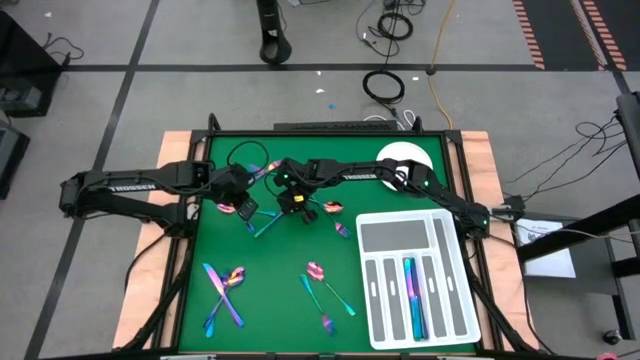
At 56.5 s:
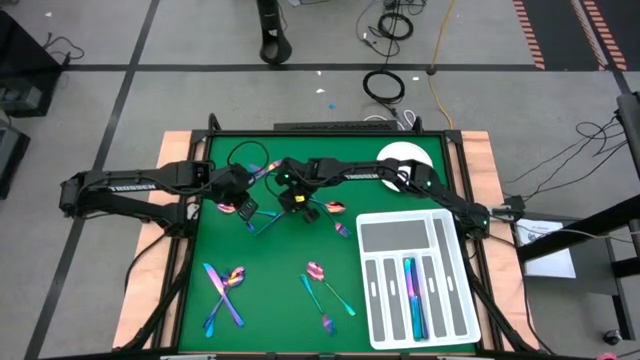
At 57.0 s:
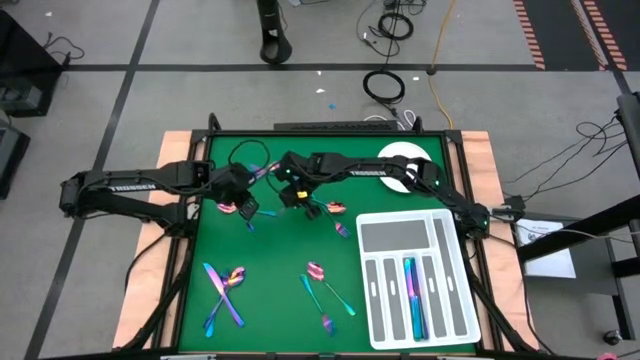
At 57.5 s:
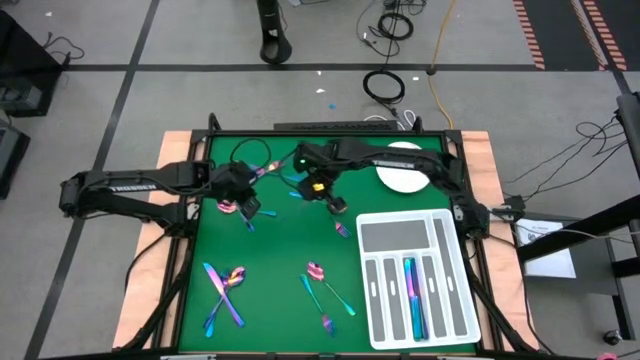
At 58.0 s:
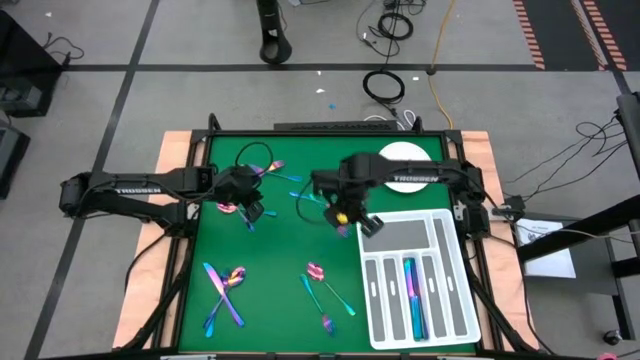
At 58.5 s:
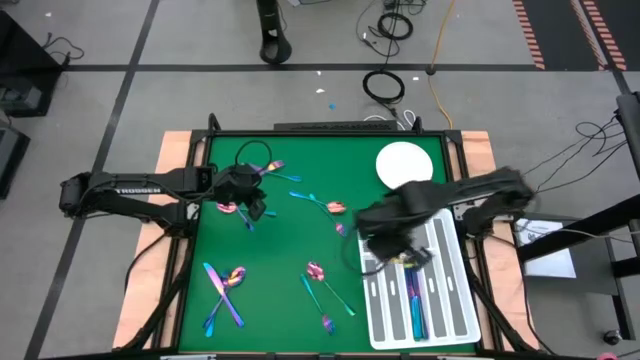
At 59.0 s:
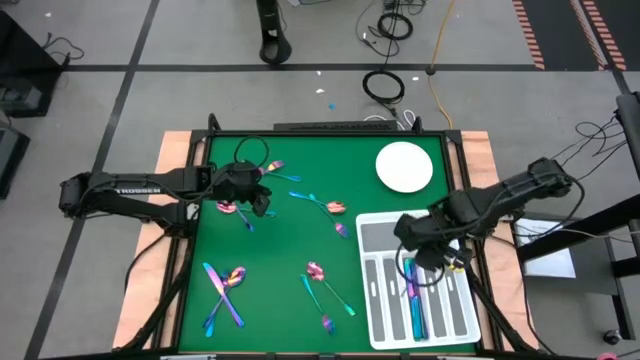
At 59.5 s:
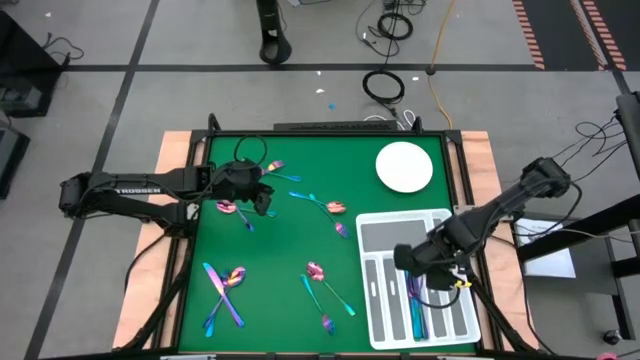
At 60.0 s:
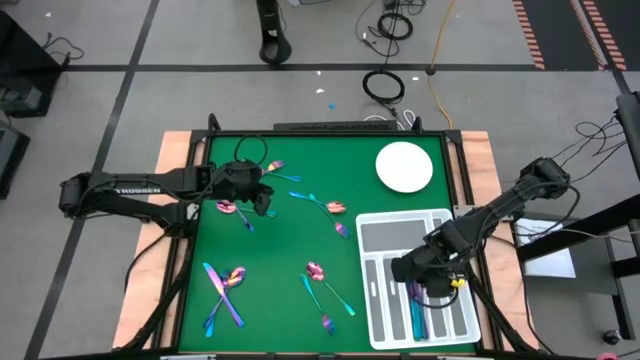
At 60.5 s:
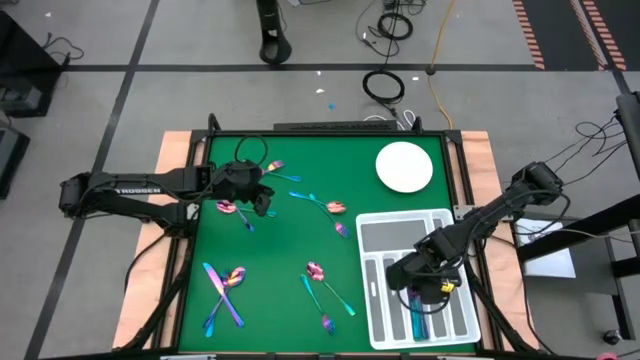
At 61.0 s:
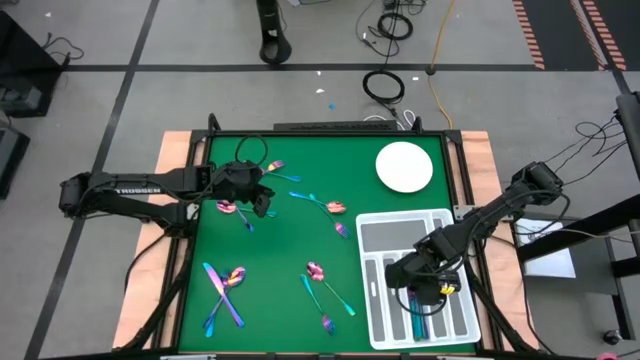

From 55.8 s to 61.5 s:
Task: Sort silverware
Put the top left knife into the utensil organizer

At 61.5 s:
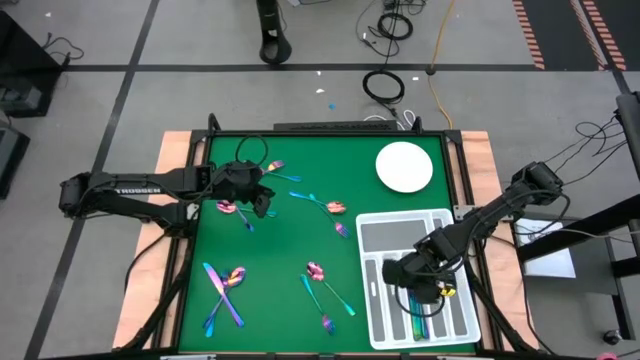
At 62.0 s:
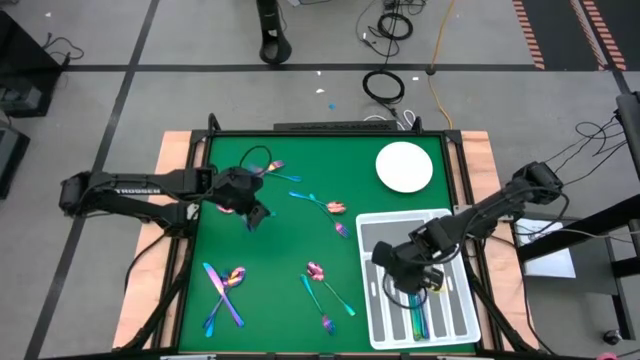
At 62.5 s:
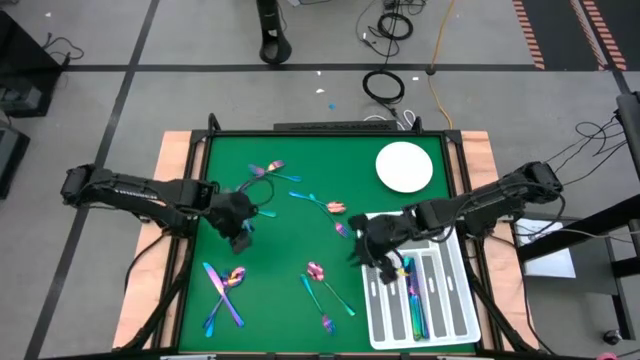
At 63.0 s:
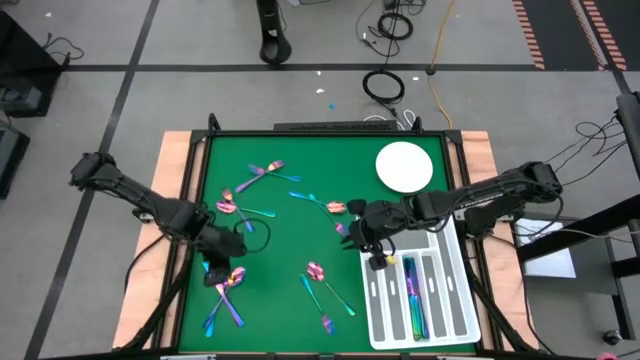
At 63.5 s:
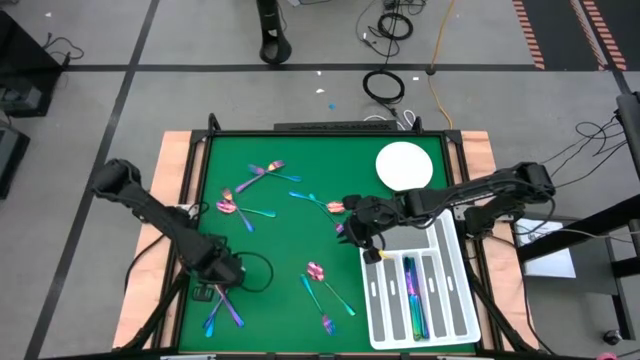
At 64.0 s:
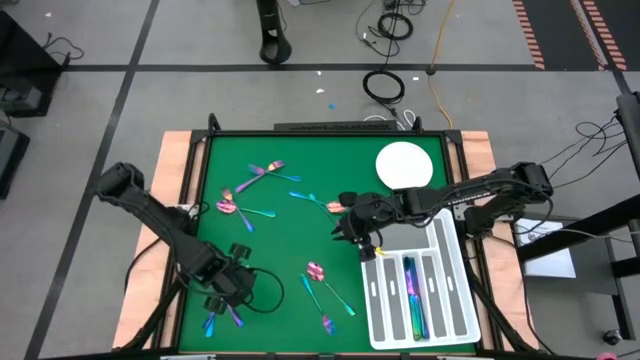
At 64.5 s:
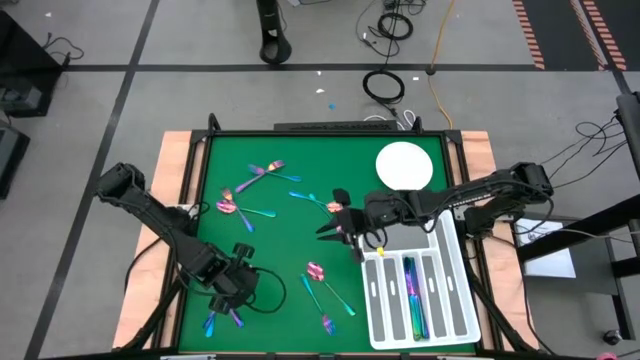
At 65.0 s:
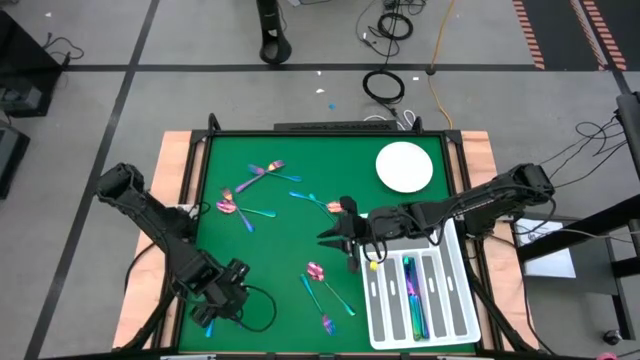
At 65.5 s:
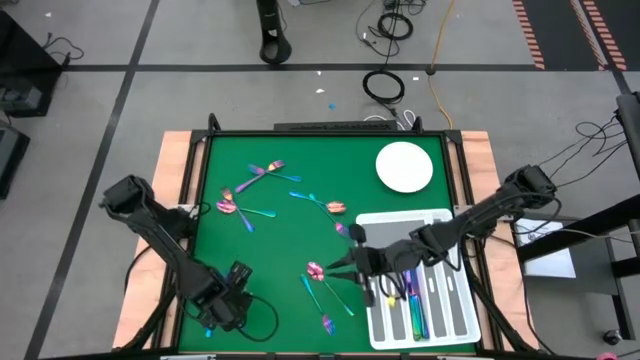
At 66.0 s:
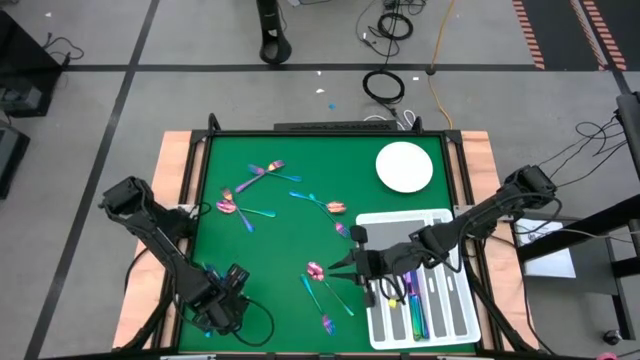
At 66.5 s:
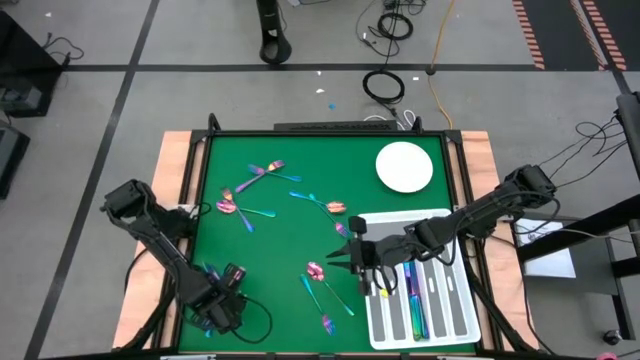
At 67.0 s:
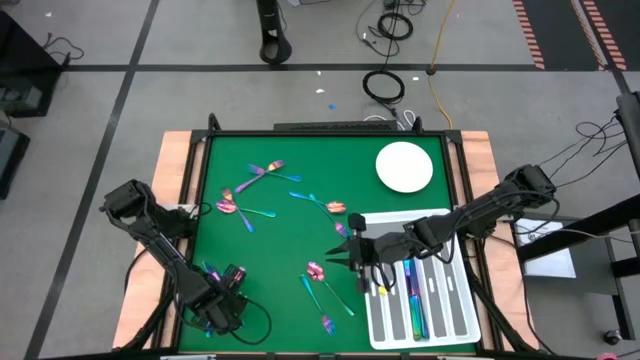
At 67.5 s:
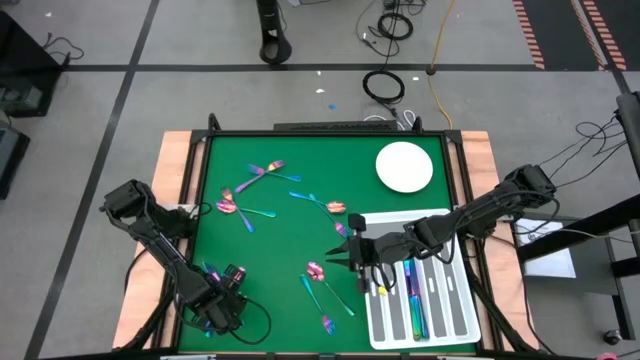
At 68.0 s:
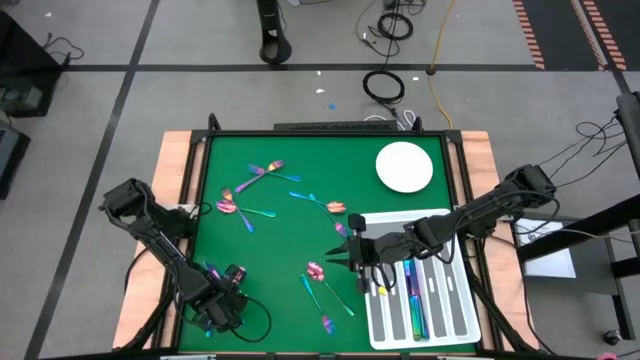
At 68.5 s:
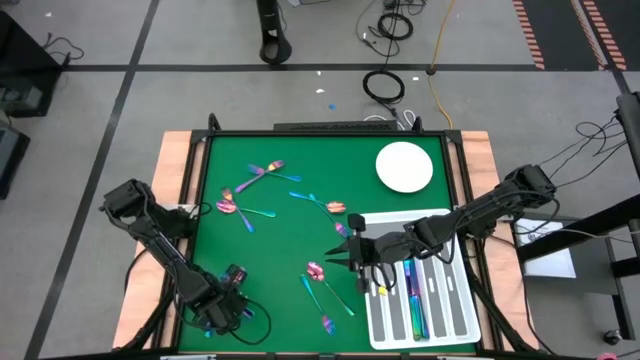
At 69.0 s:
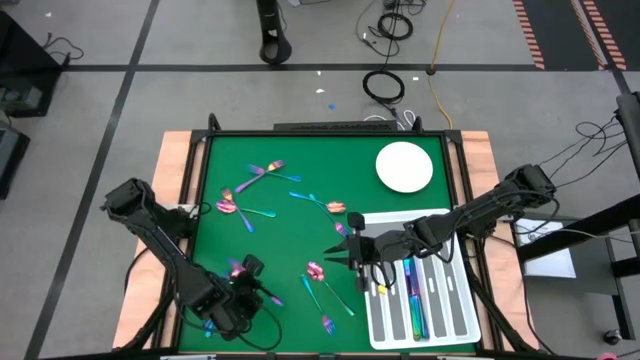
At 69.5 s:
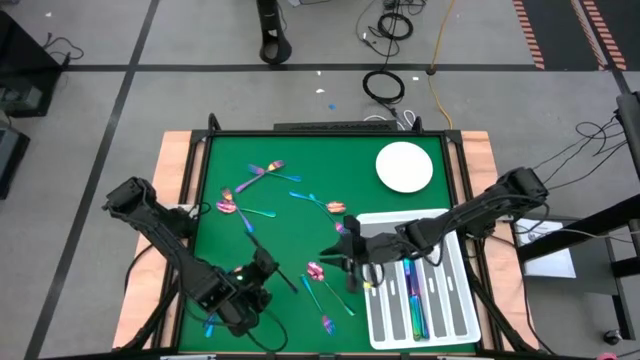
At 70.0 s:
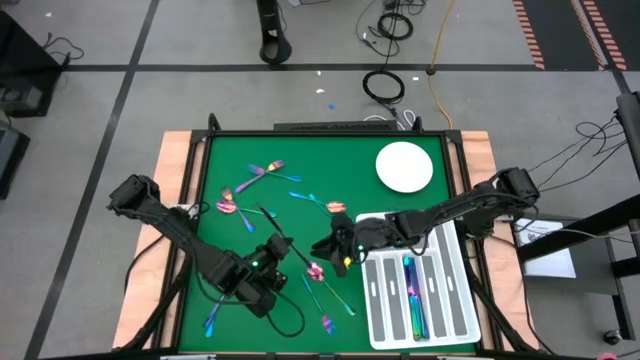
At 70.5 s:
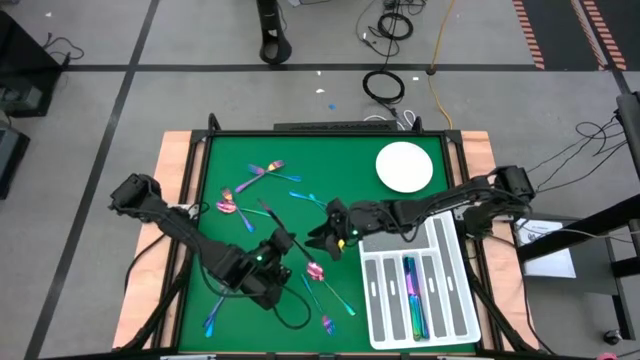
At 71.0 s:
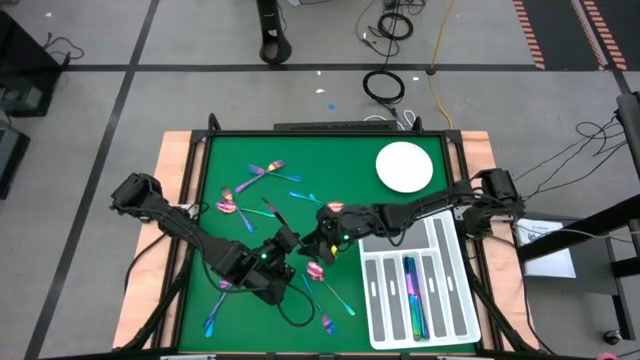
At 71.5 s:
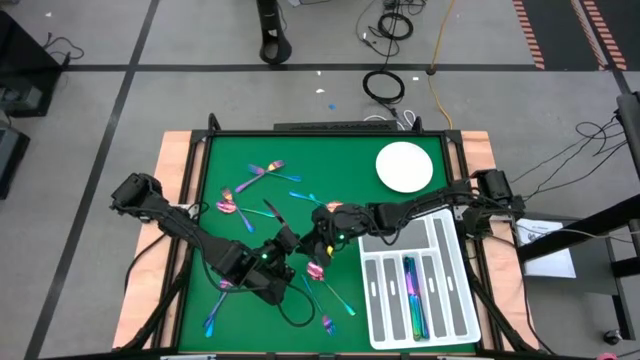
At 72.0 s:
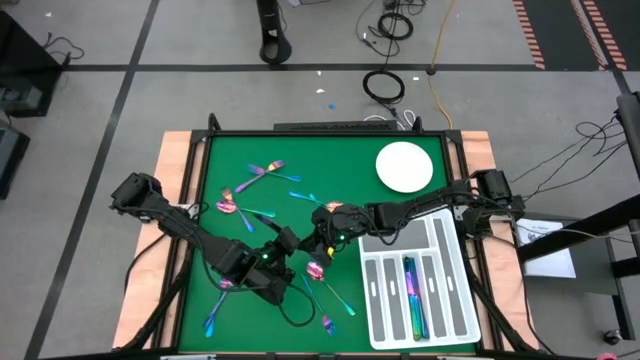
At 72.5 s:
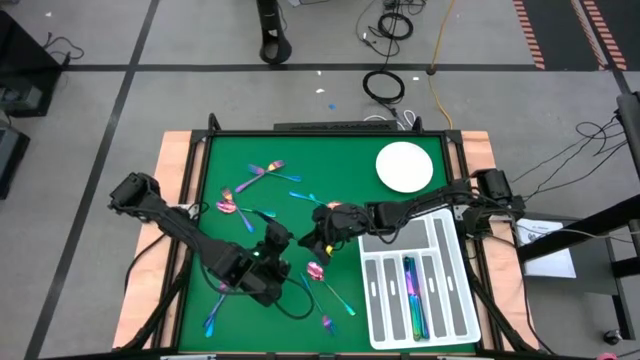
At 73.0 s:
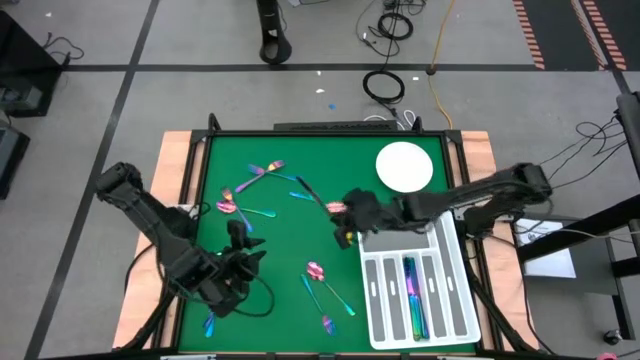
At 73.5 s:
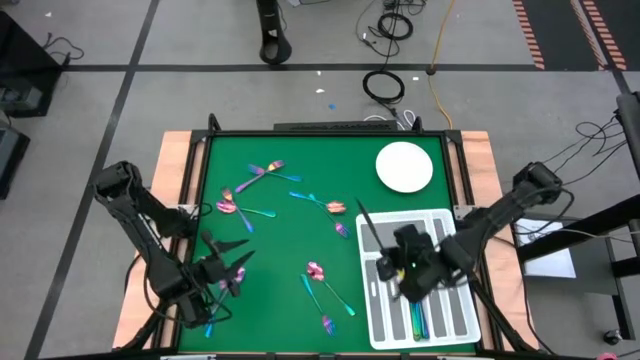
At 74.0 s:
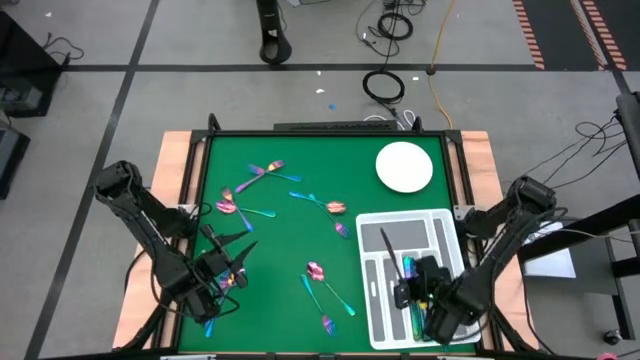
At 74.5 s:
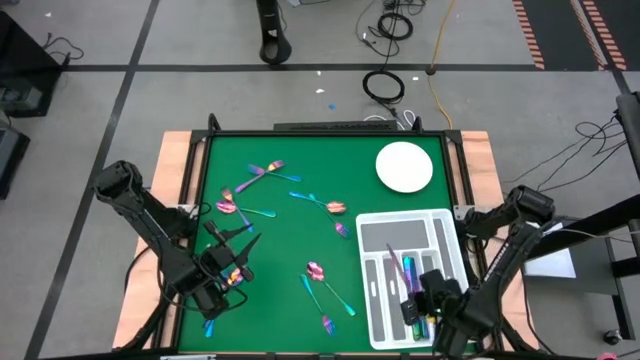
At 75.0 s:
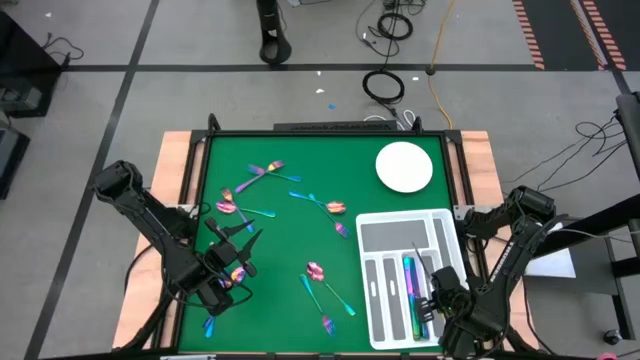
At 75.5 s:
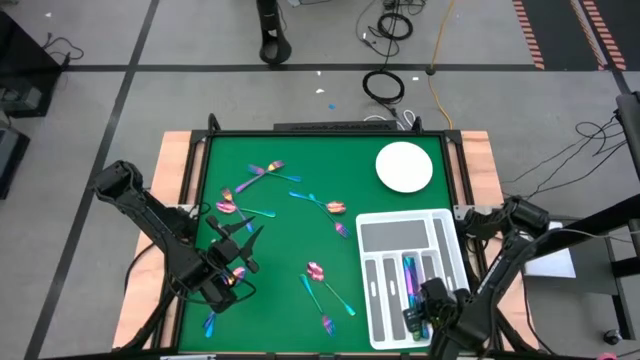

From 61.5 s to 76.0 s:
Put the knife into the utensil organizer
